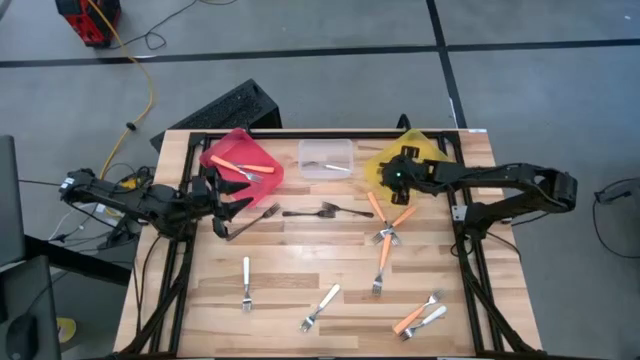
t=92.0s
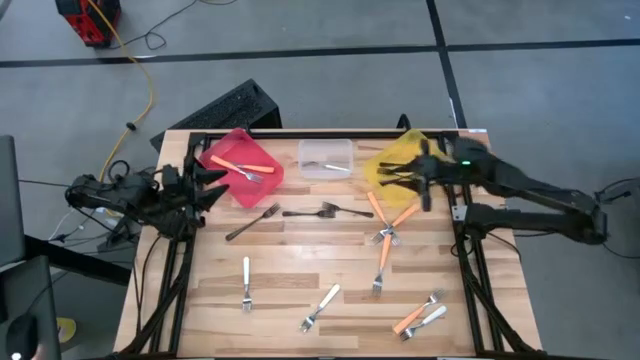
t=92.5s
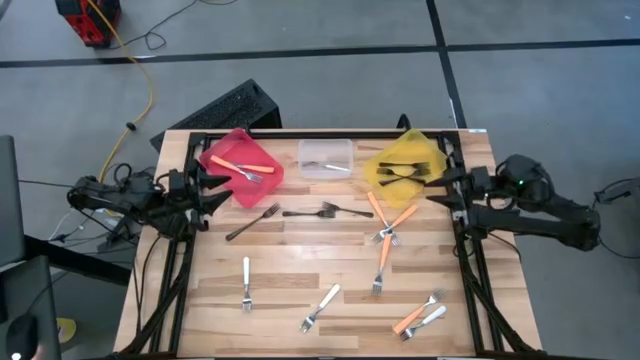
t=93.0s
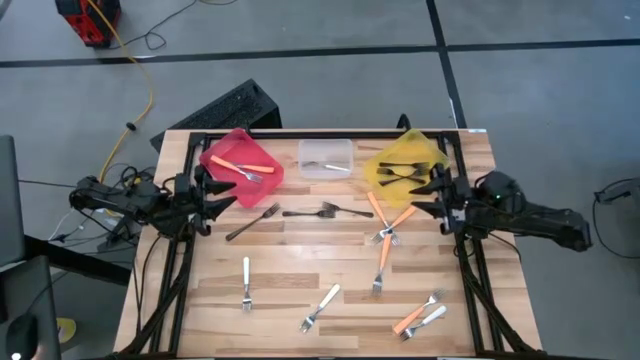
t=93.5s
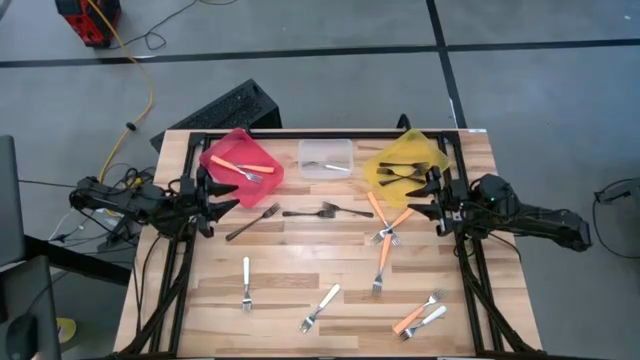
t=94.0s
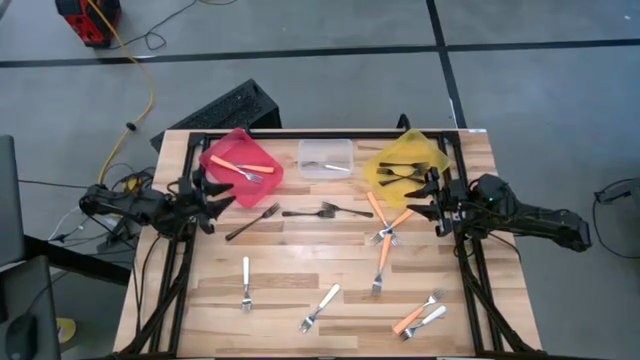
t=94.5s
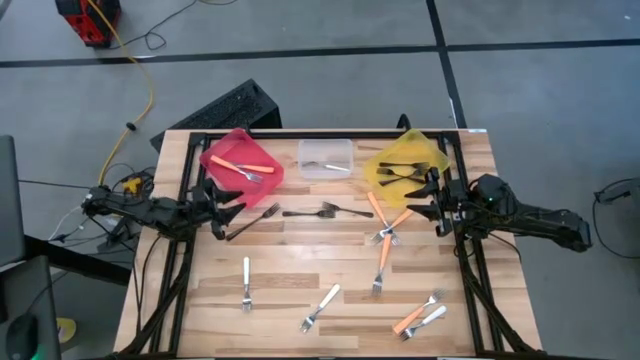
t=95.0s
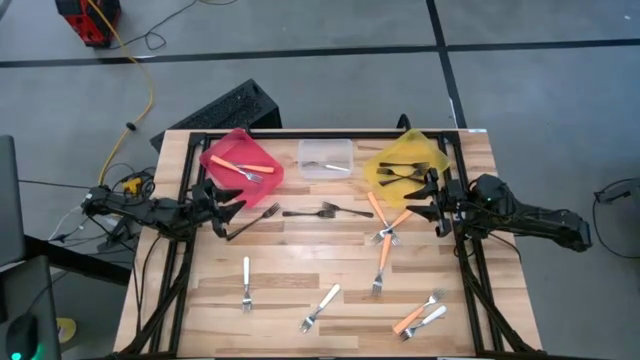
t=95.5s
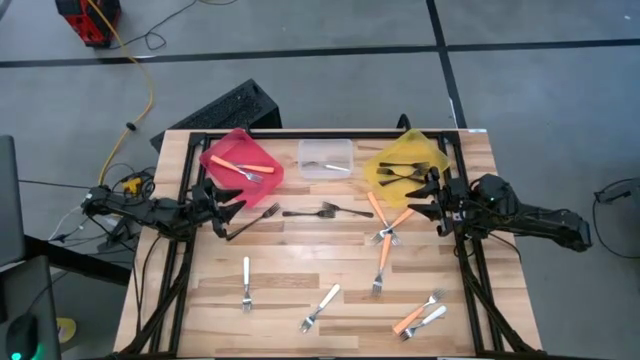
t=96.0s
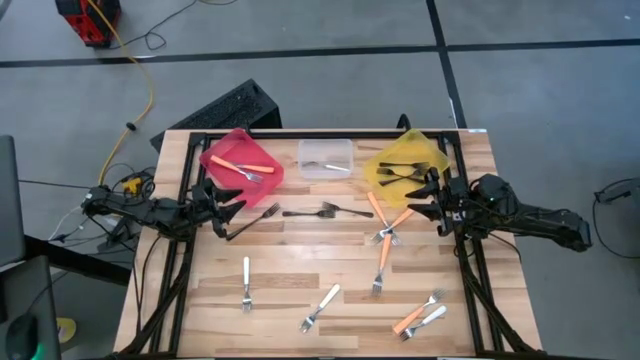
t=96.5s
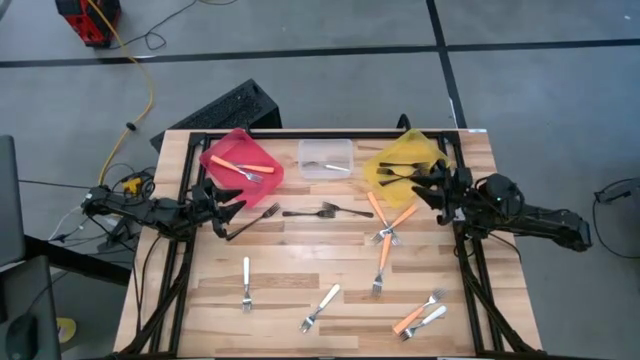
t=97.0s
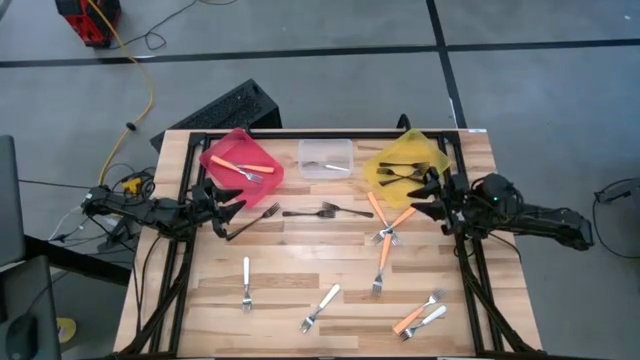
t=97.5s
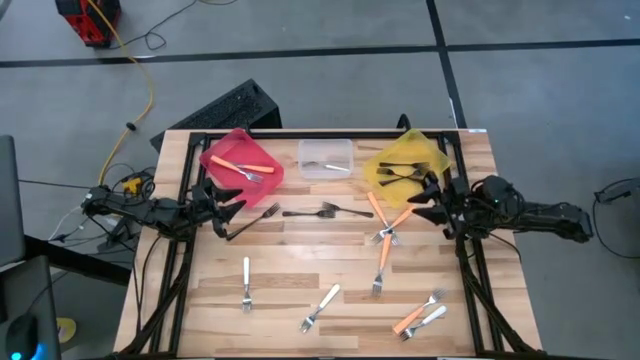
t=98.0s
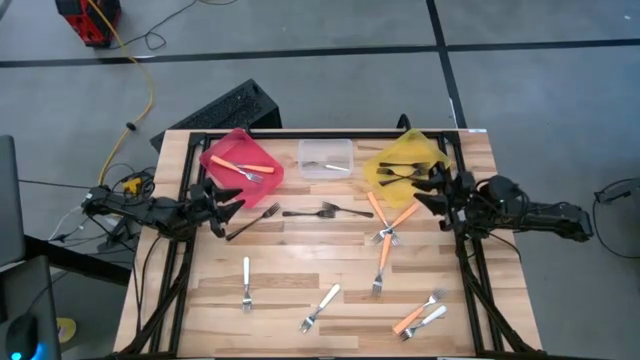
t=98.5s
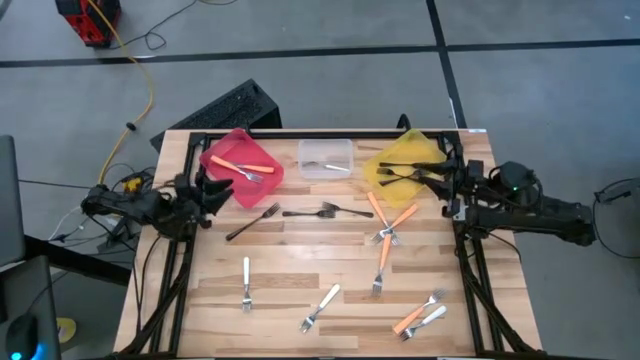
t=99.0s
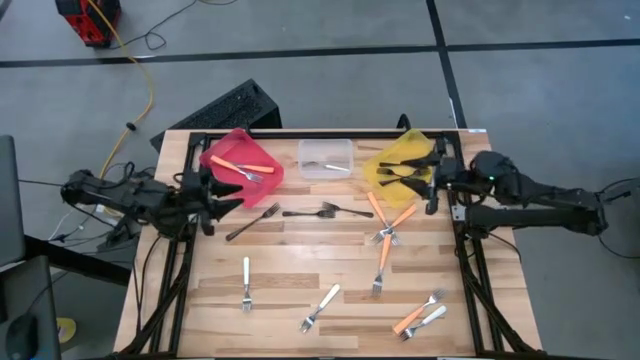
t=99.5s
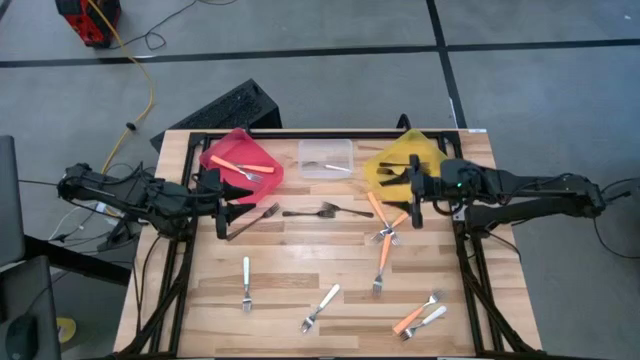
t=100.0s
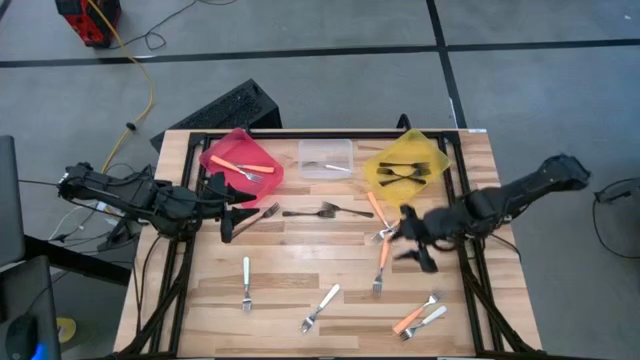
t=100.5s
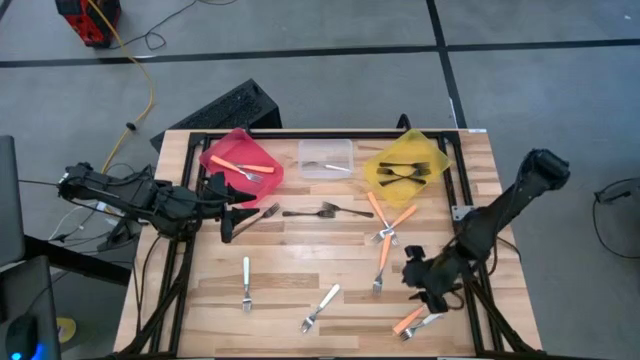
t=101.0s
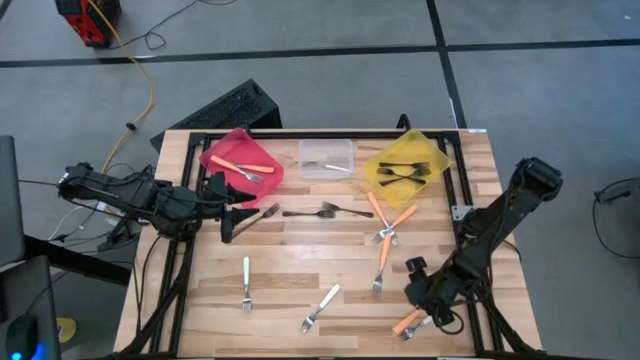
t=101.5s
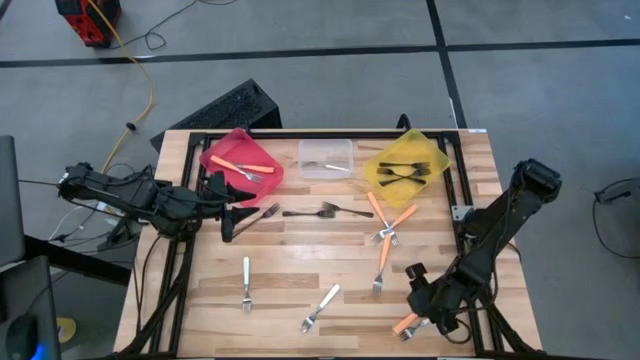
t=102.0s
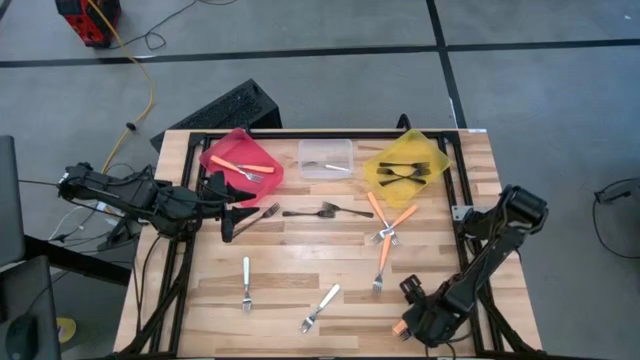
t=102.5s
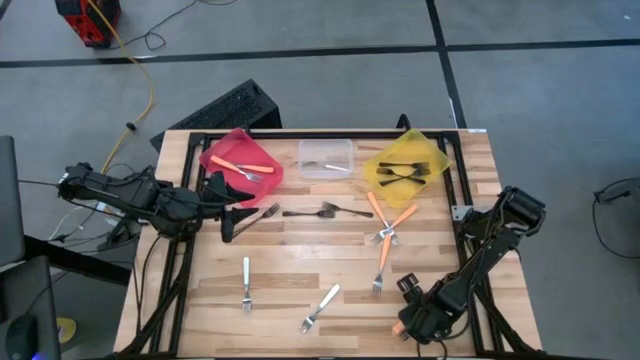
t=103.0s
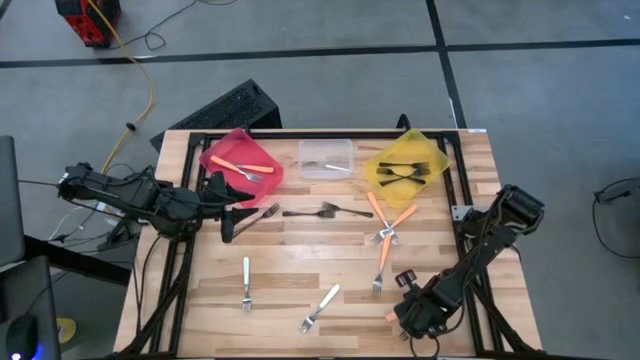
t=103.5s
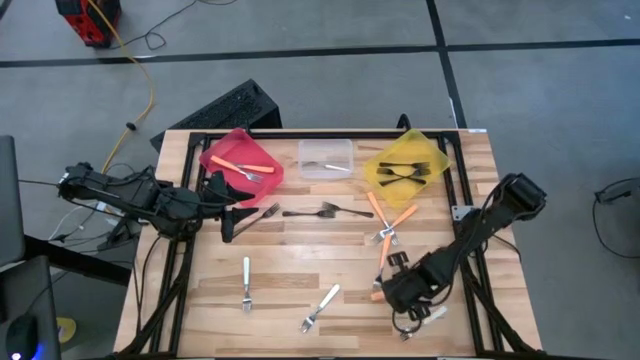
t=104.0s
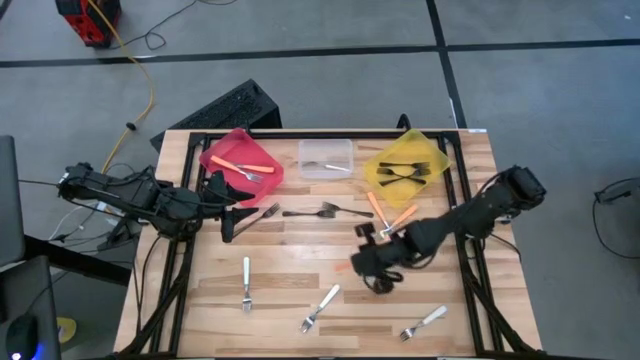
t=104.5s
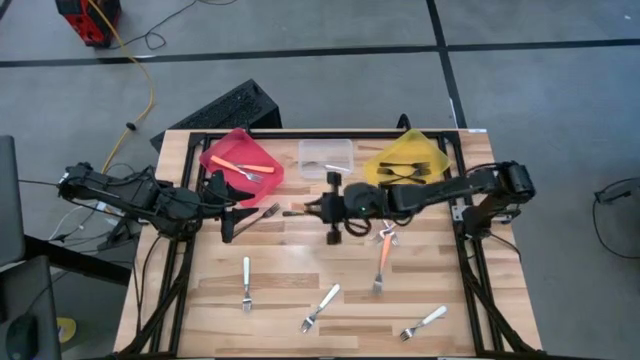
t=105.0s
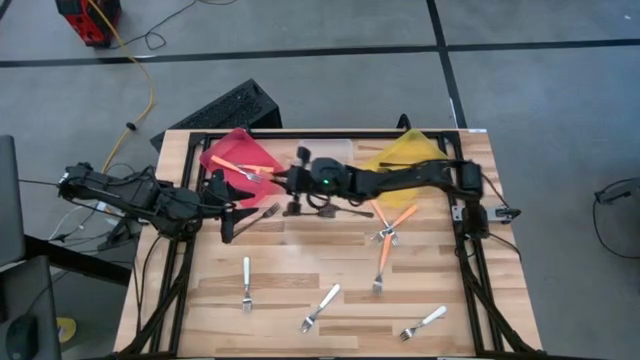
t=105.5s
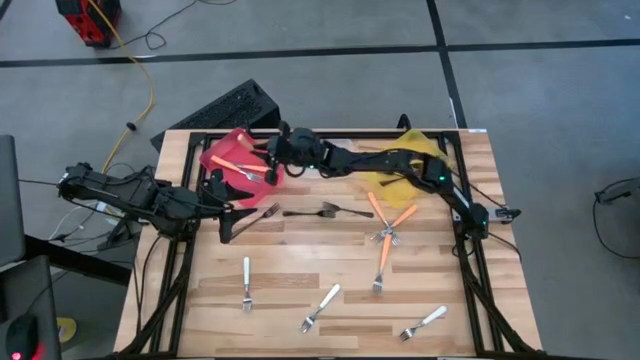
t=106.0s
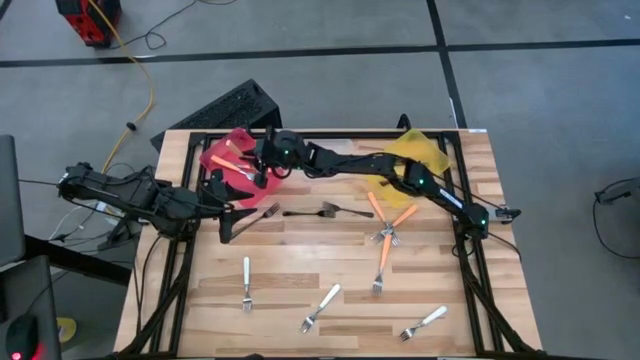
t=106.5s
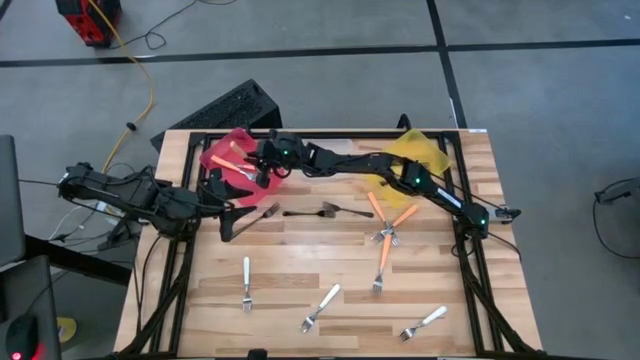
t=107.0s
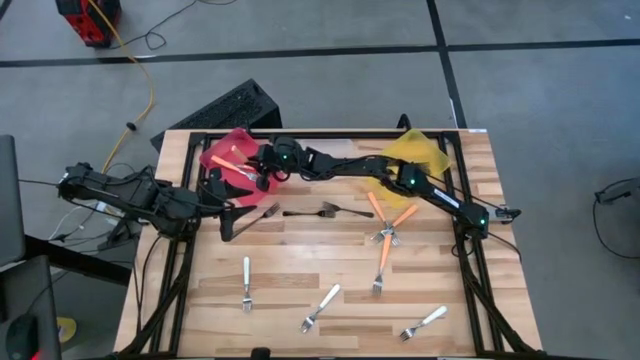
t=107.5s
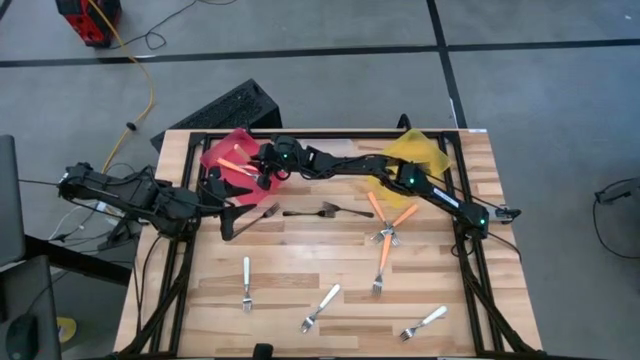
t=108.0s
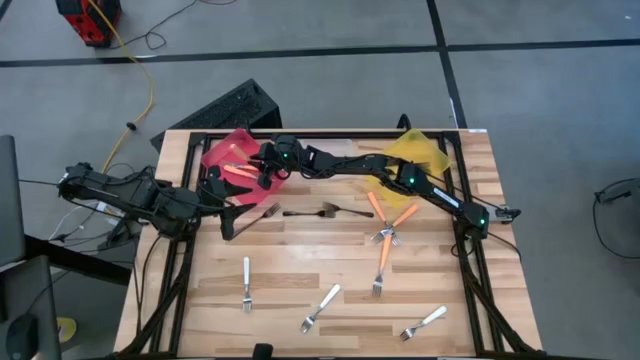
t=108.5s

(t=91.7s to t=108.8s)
Task: Sort silverware by color (type)
Put the orange fork into the red bin

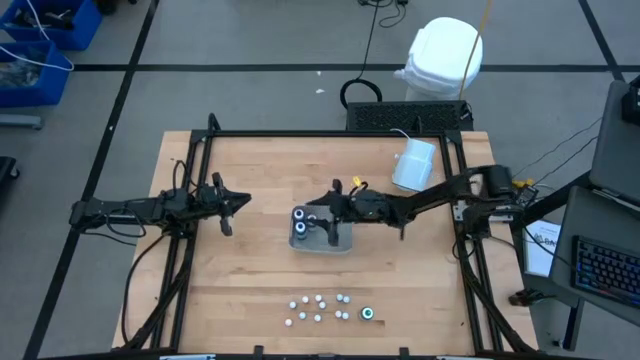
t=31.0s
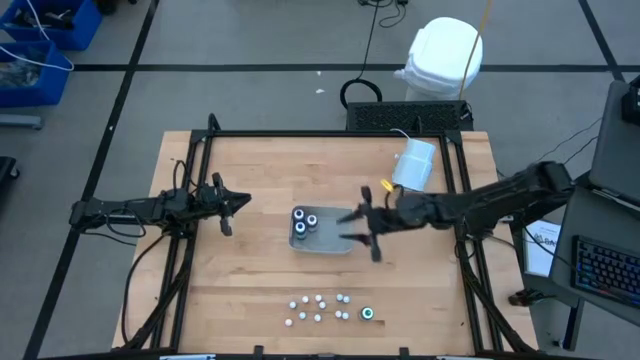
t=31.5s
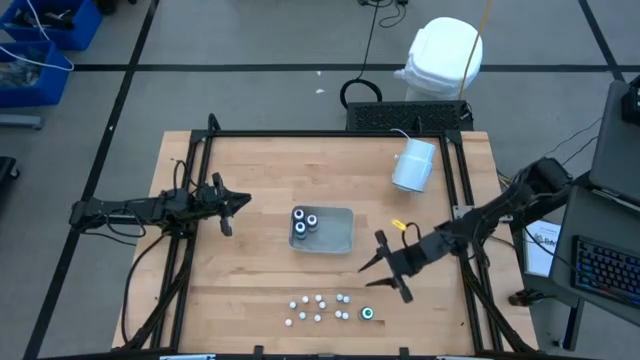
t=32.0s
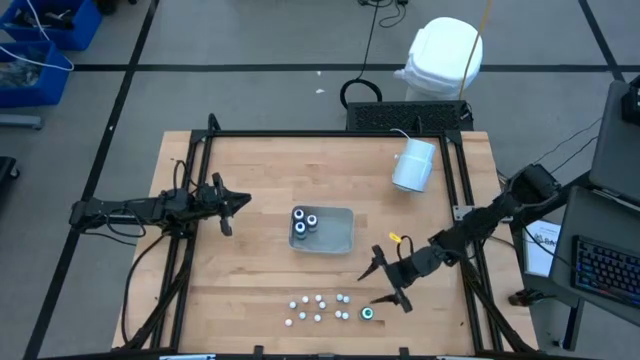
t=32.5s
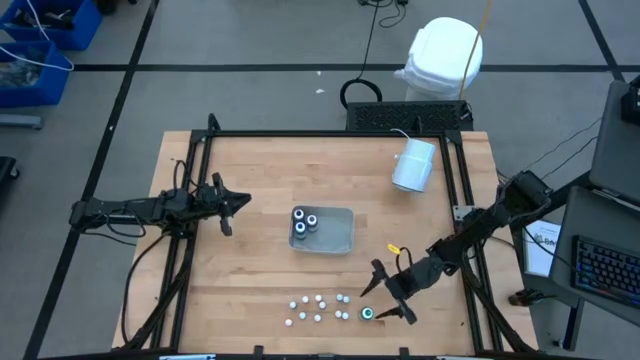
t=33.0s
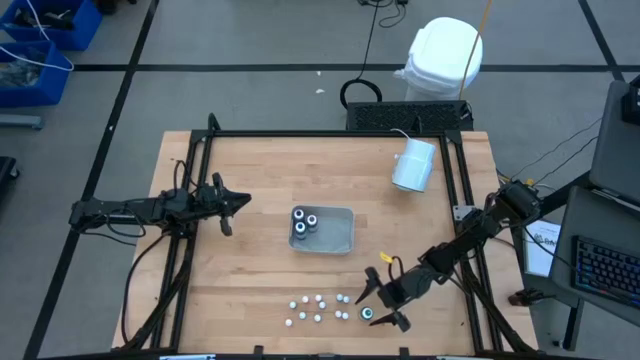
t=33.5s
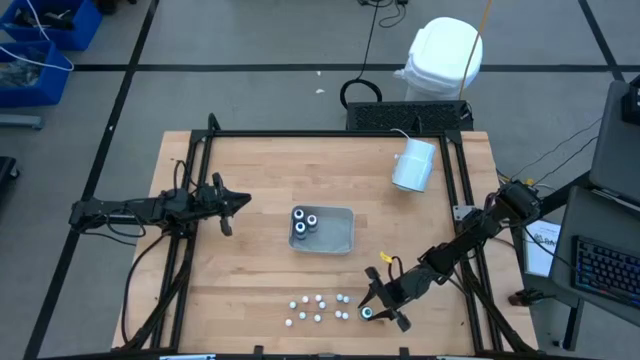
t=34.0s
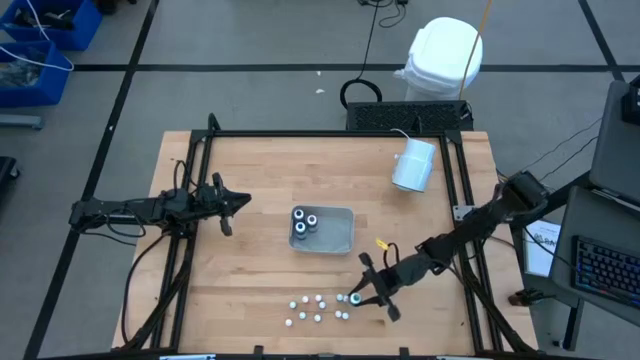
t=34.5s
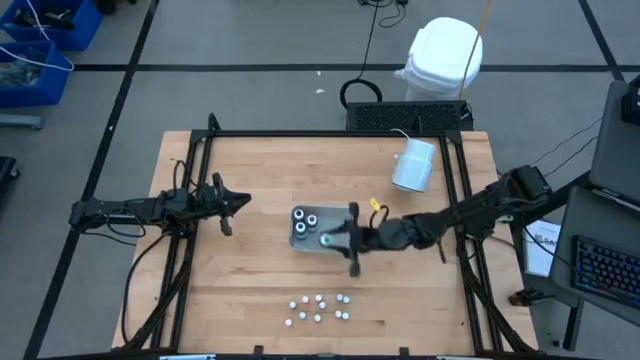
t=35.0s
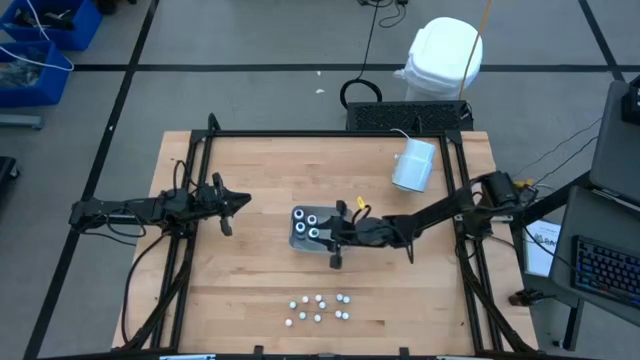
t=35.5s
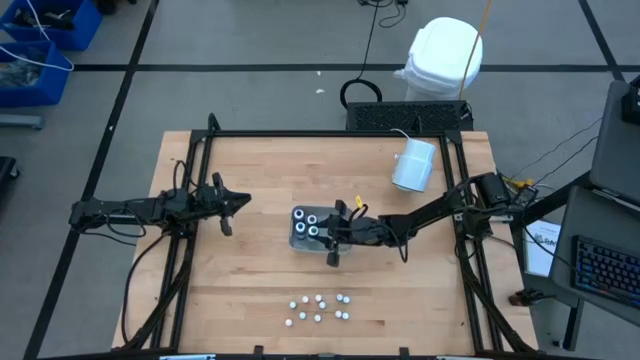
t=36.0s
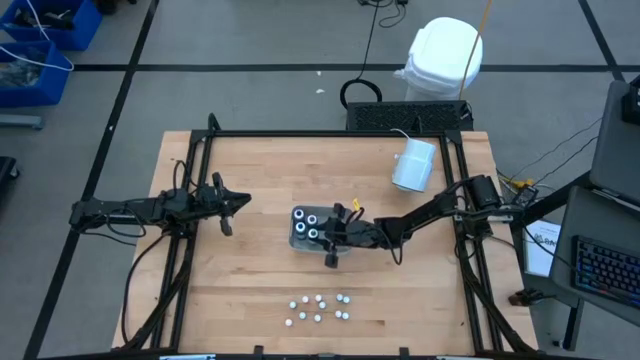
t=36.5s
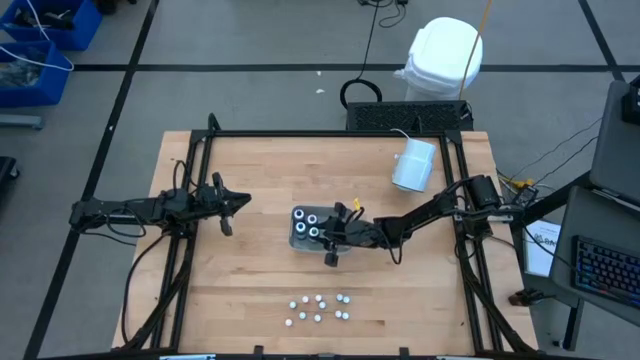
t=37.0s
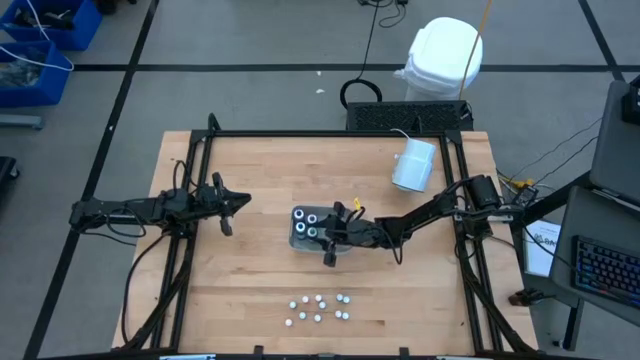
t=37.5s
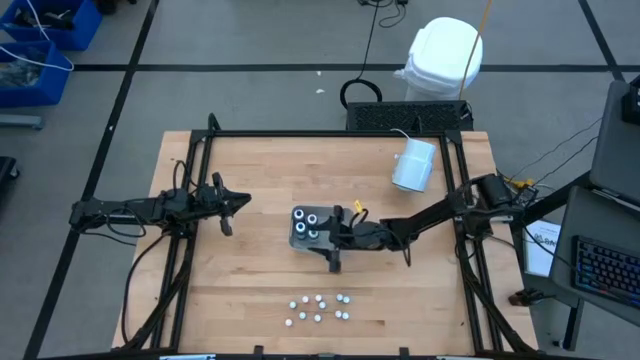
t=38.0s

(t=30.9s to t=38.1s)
Task: Pick & Place food coloring
Put the big green bottle into the gray bin
